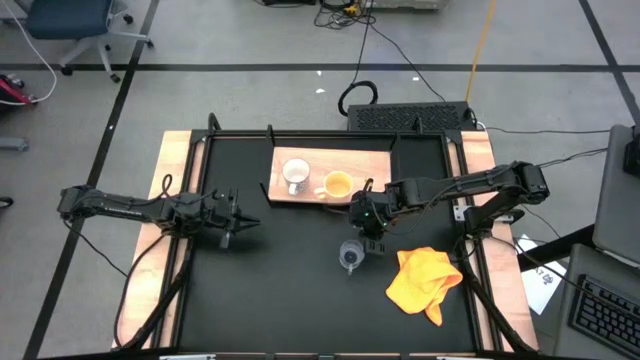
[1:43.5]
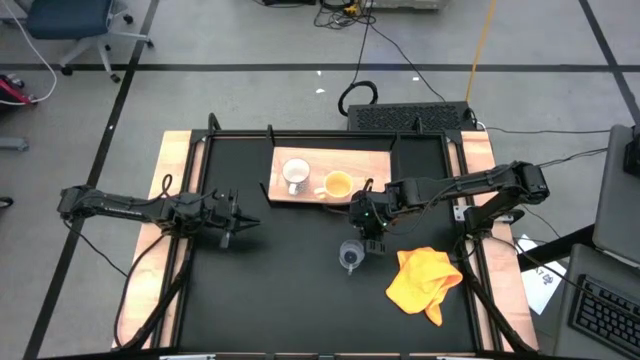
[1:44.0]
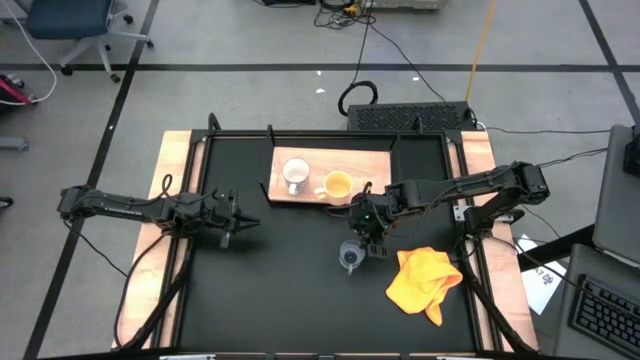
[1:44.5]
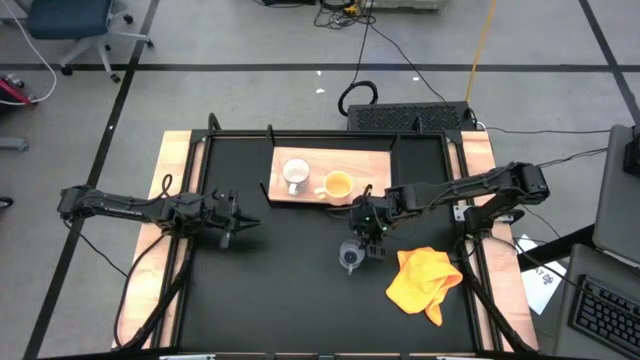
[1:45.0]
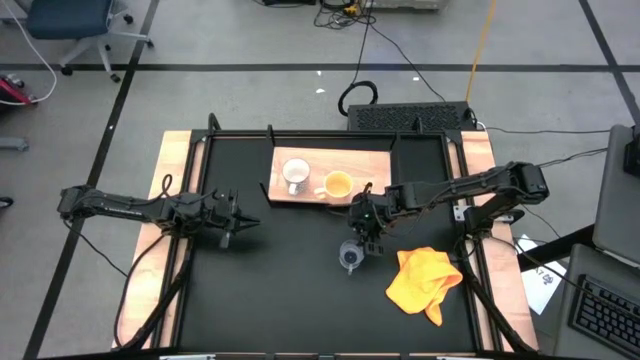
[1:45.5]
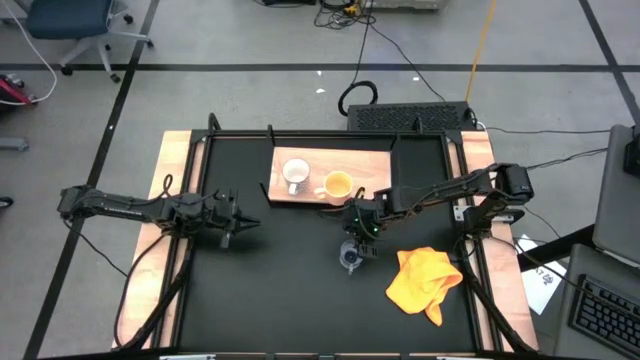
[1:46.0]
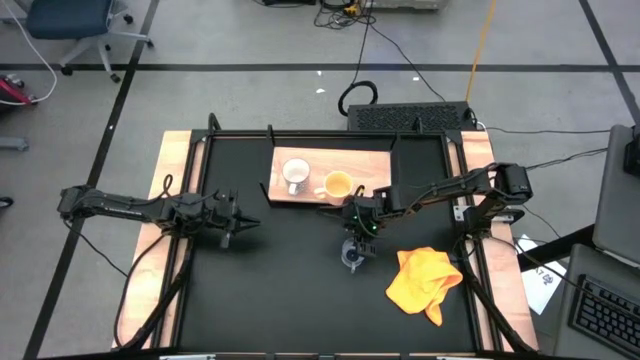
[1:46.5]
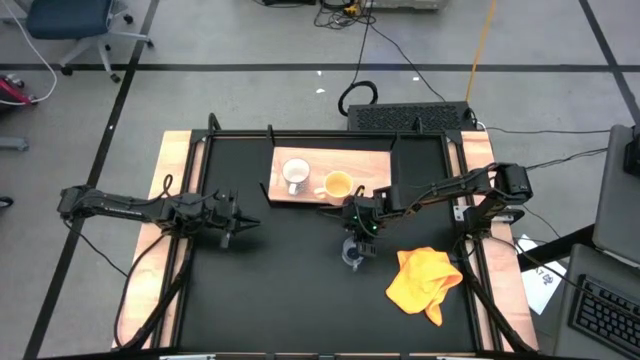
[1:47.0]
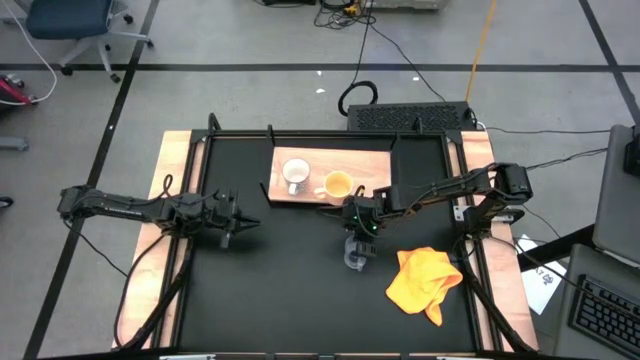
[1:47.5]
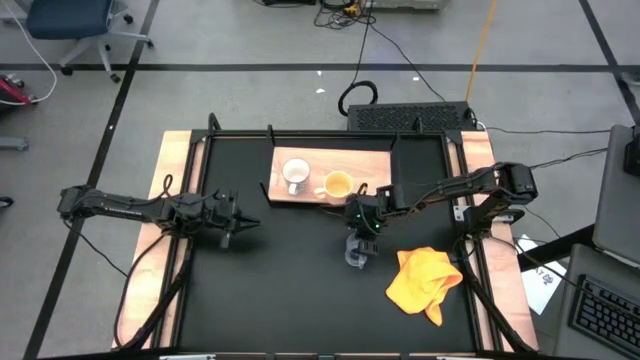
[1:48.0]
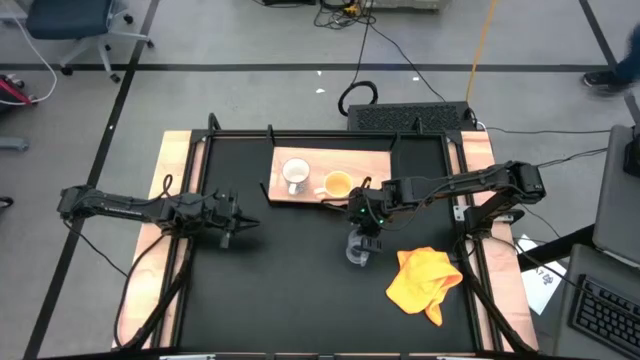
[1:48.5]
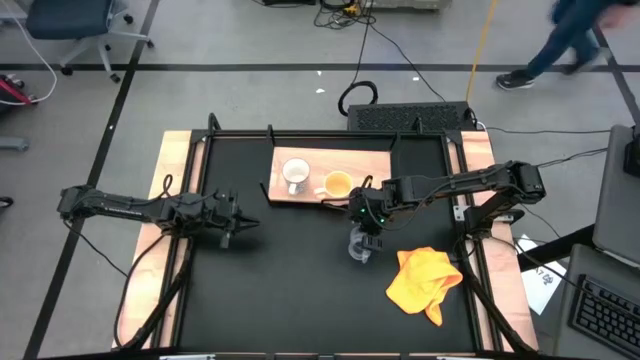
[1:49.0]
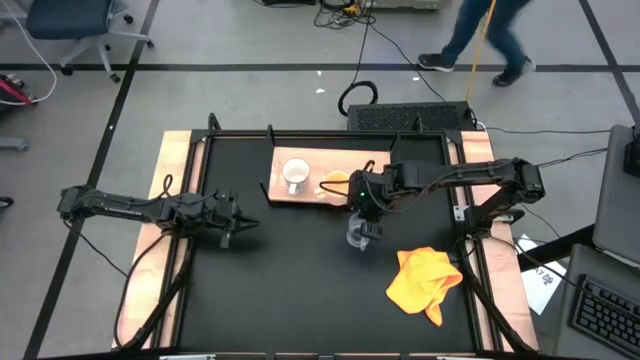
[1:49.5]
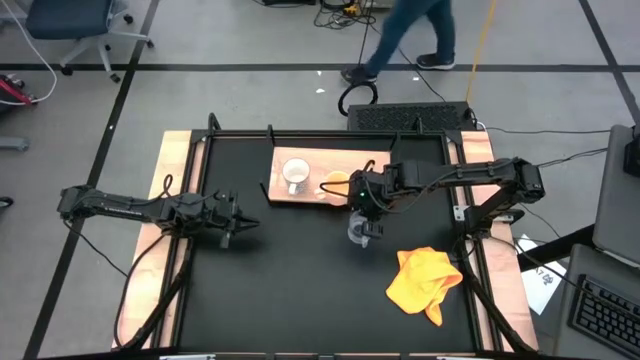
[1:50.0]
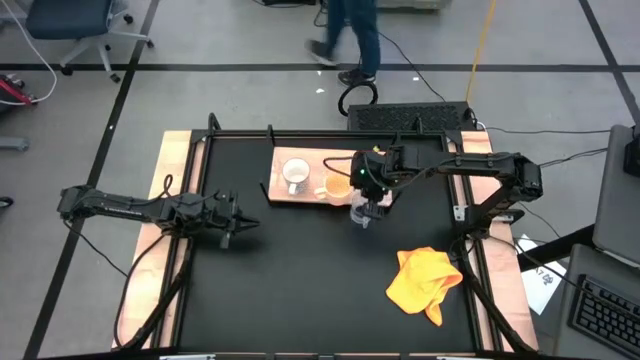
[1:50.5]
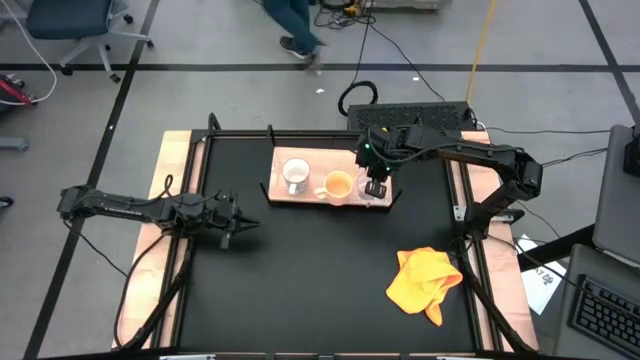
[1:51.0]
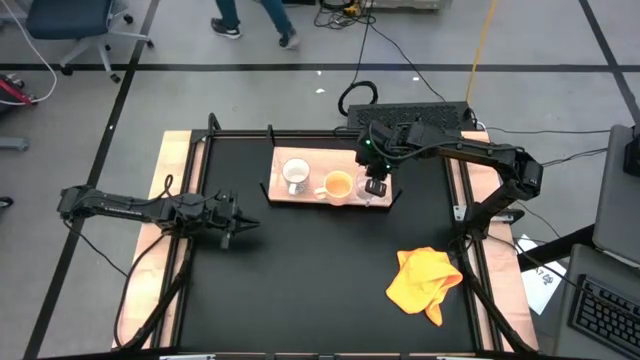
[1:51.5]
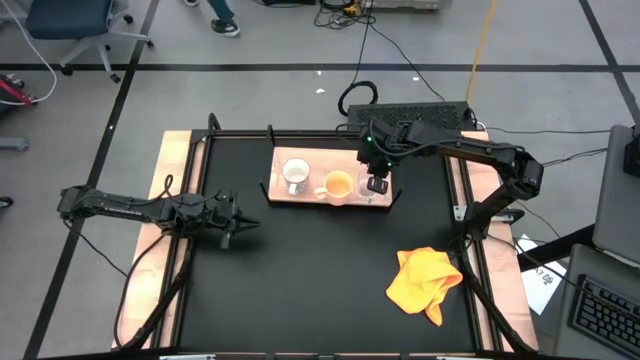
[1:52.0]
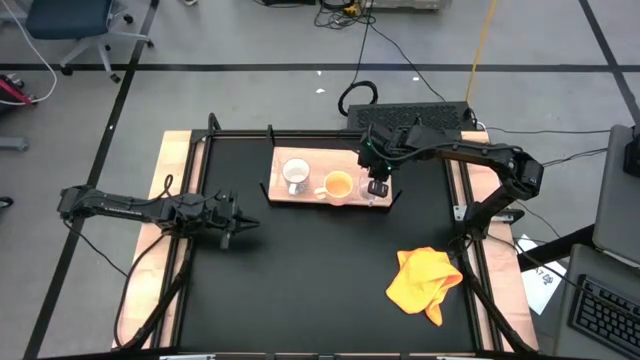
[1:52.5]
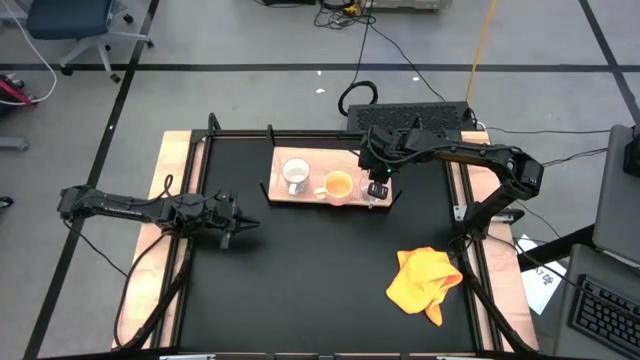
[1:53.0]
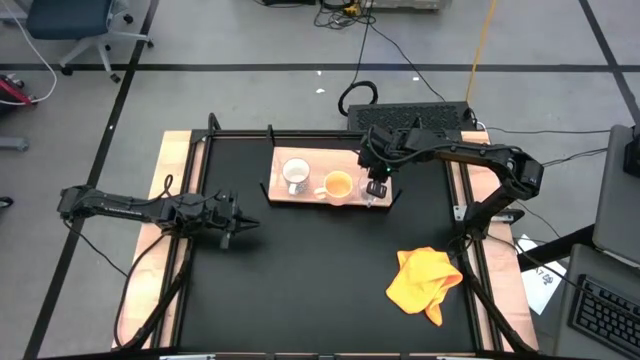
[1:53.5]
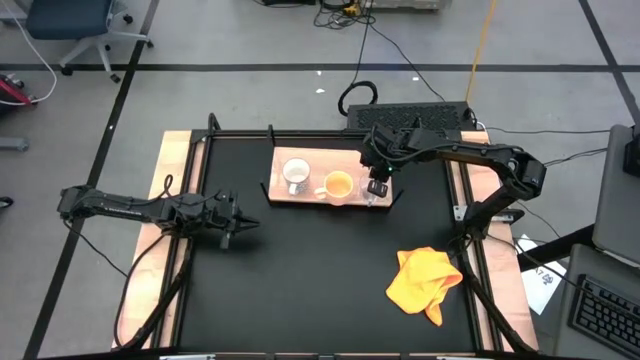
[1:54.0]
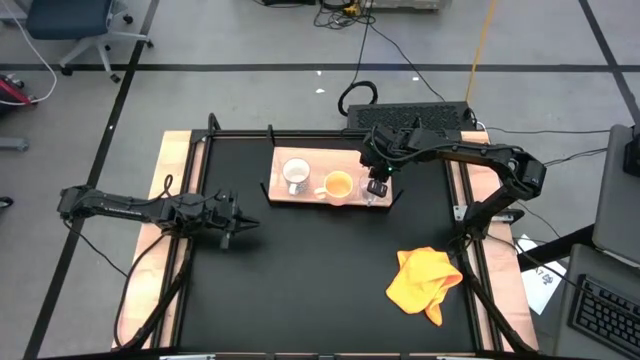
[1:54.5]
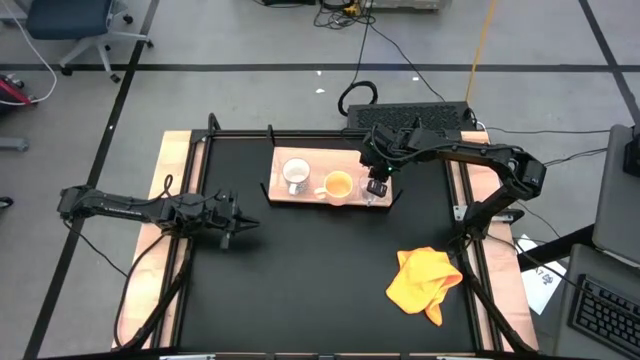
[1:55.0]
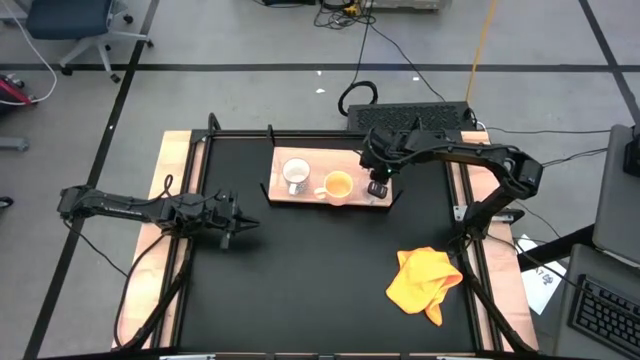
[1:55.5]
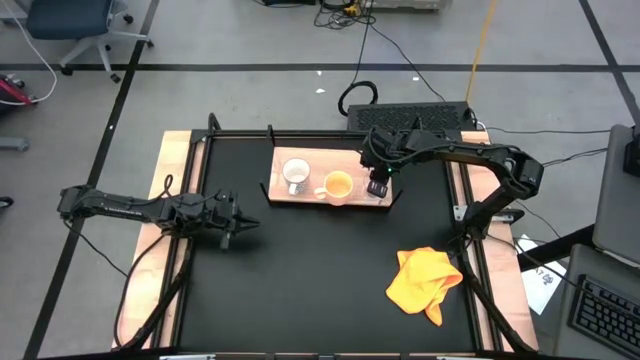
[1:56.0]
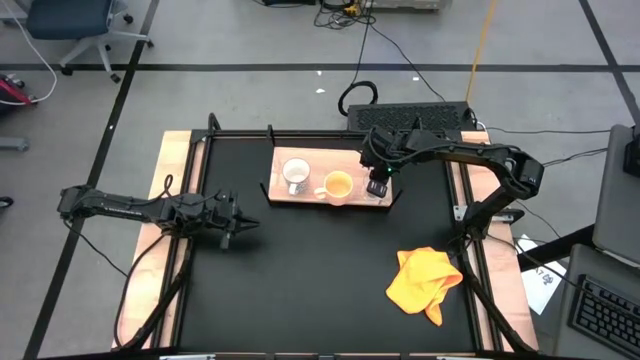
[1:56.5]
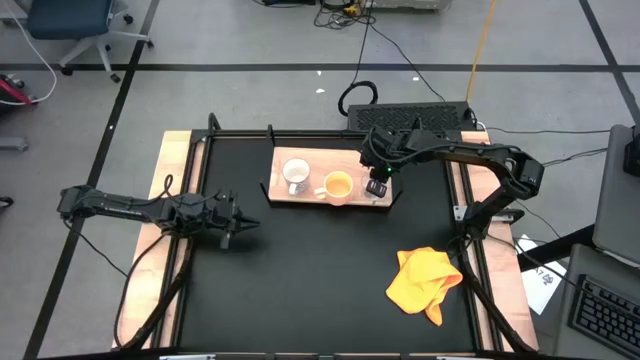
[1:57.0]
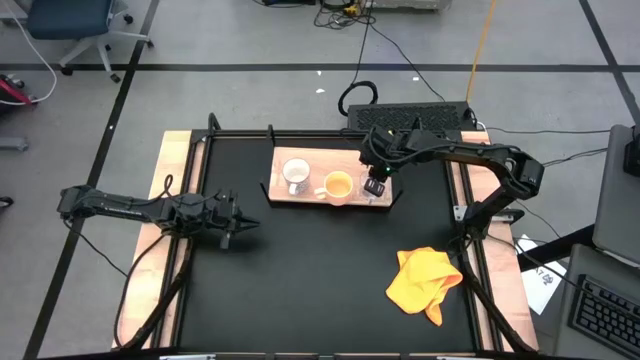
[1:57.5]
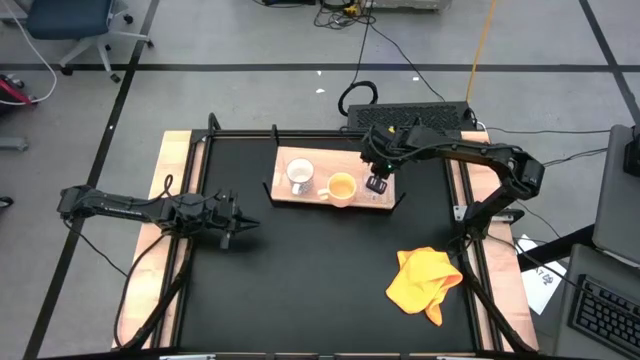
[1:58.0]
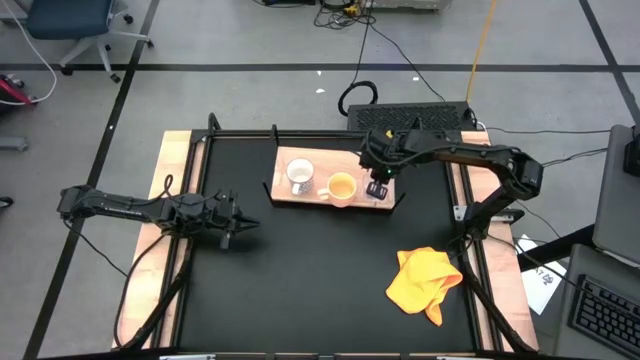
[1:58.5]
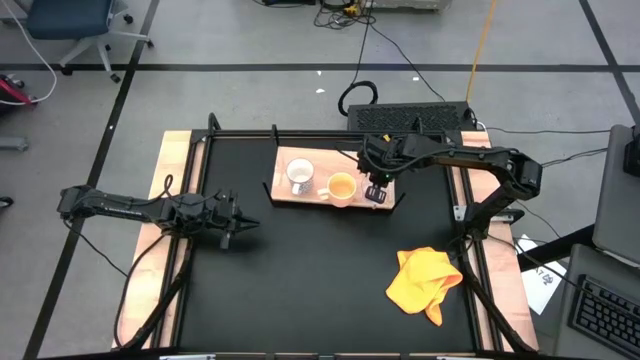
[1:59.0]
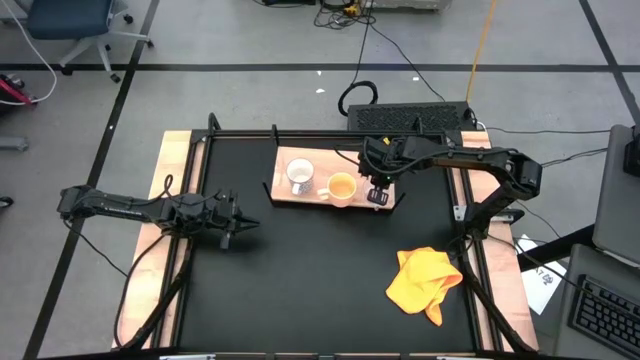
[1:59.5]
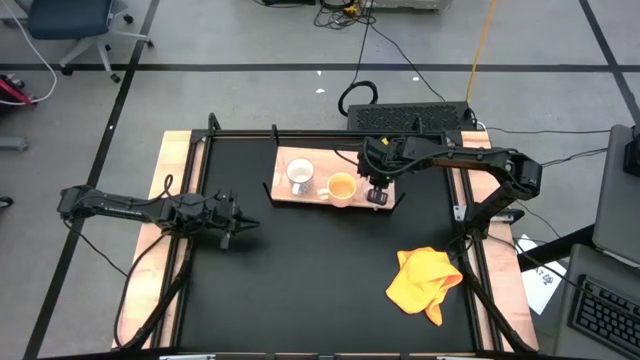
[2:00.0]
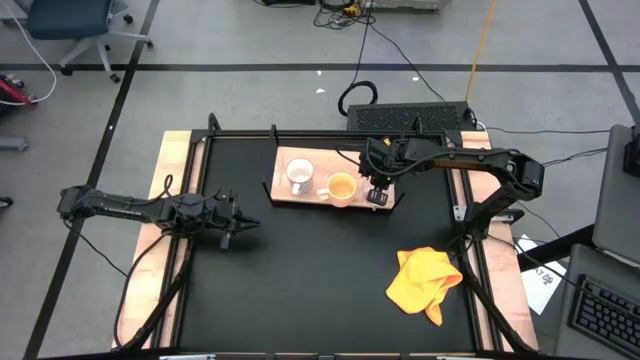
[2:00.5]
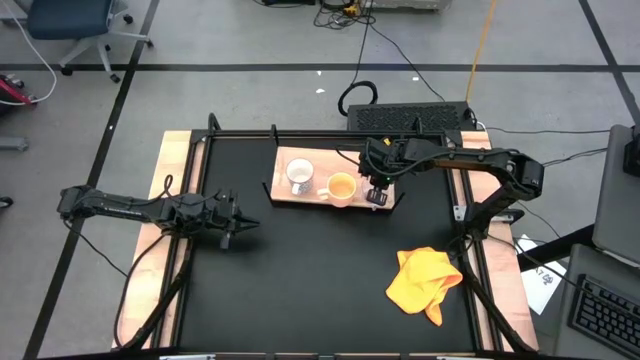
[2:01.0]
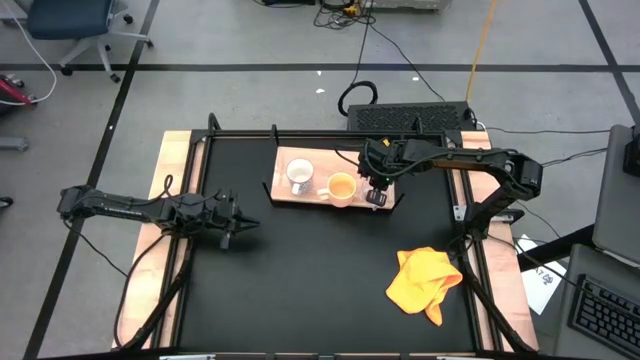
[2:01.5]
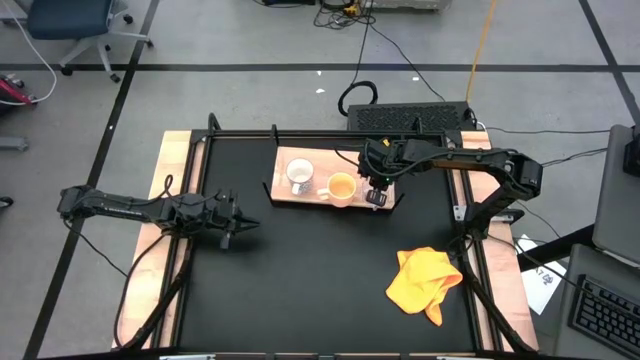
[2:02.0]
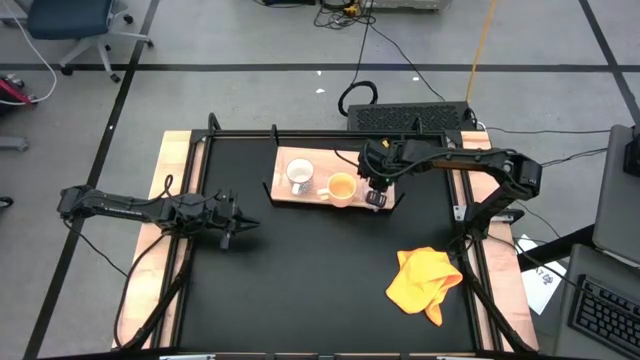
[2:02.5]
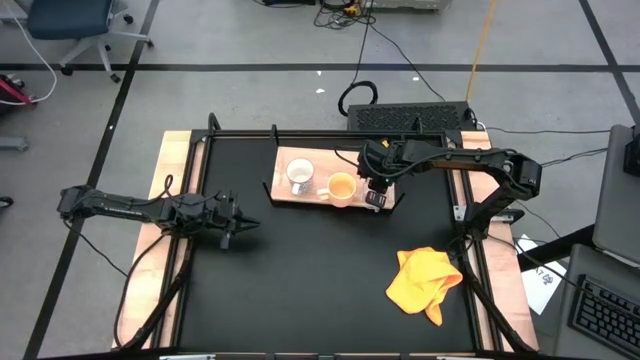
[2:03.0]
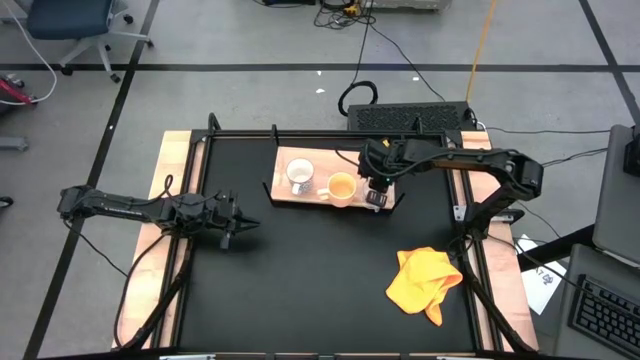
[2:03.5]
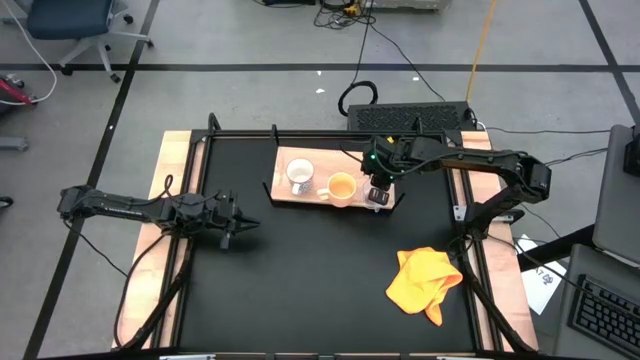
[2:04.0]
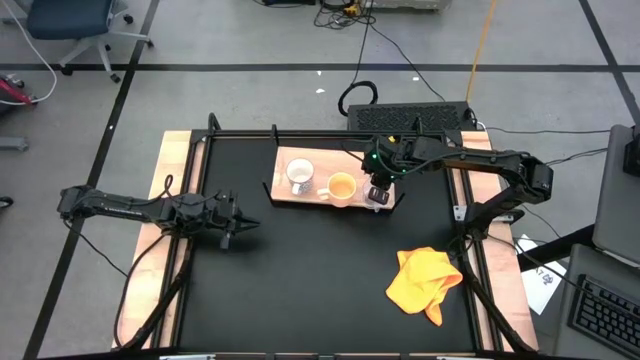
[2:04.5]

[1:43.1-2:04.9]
Task: Stack small to large cups/mugs on shelf
Put the transparent mug on the shelf
